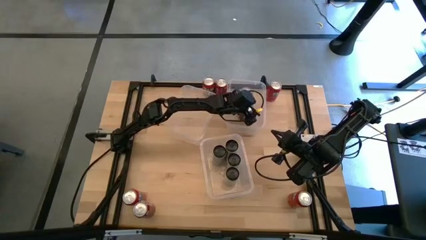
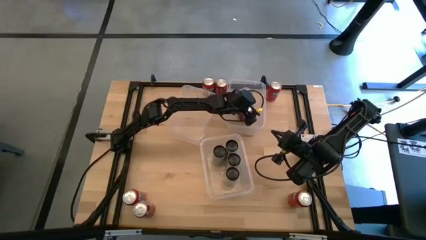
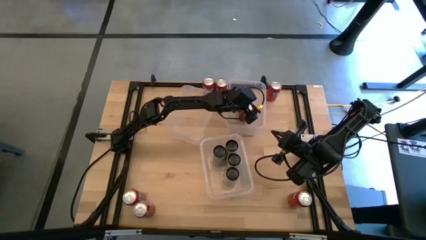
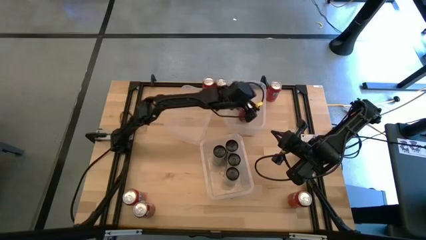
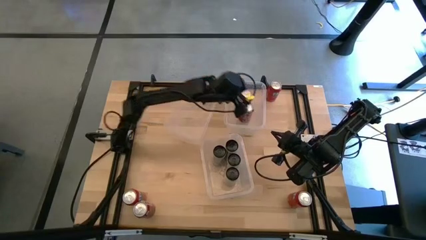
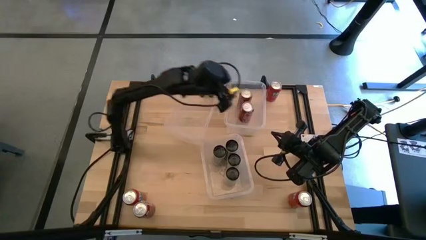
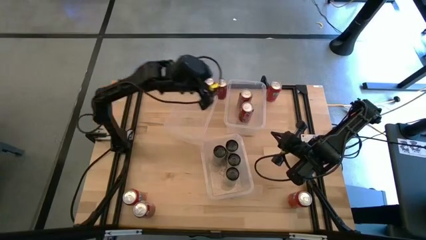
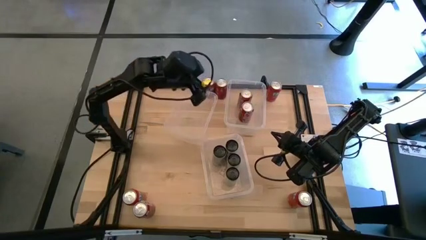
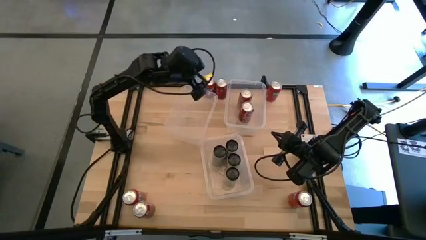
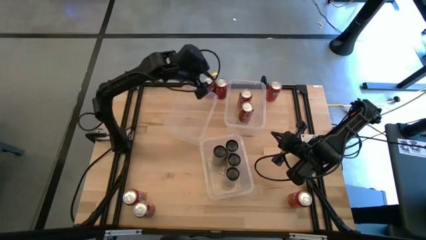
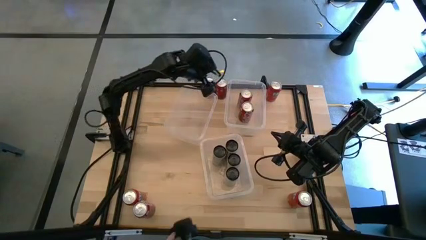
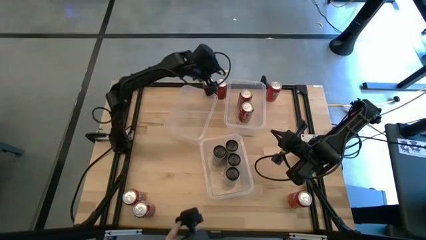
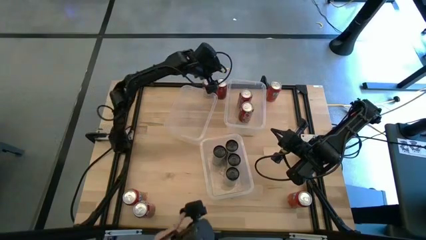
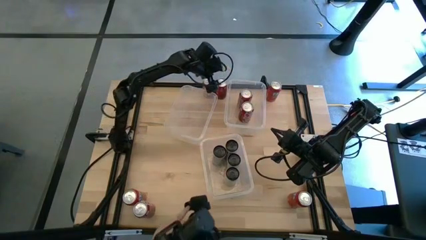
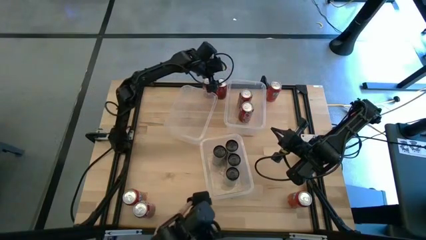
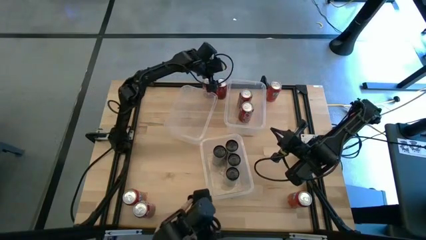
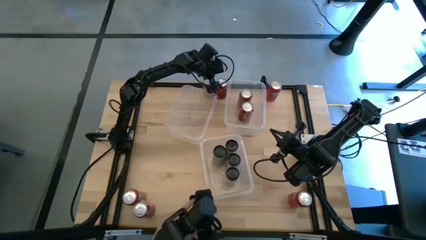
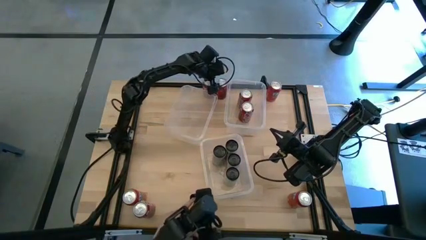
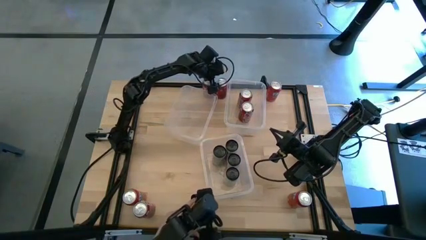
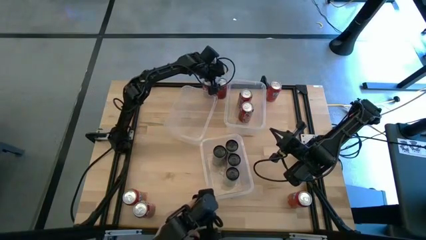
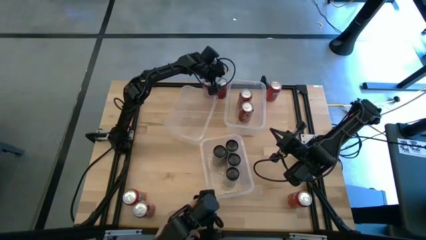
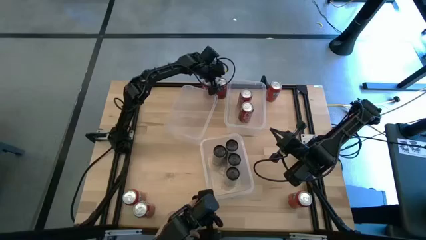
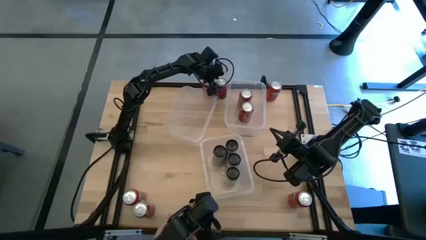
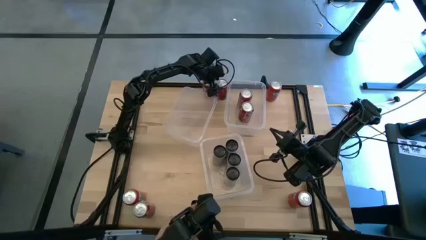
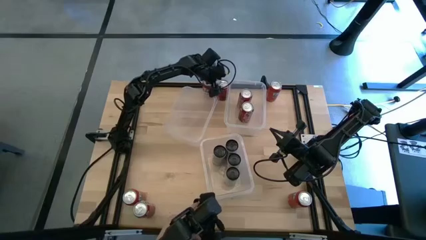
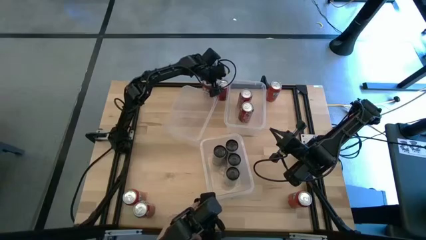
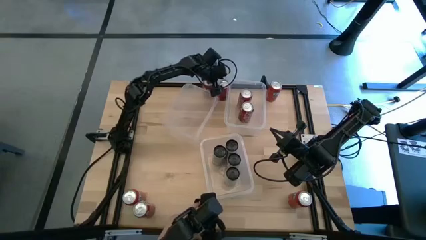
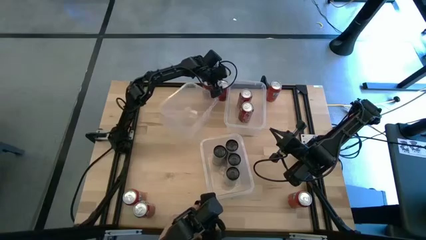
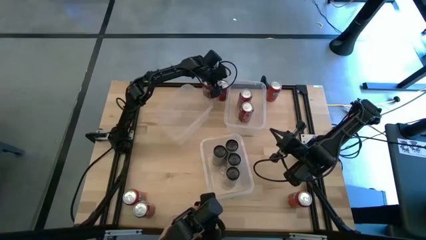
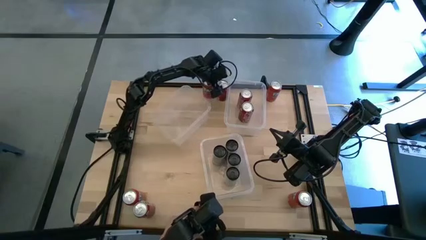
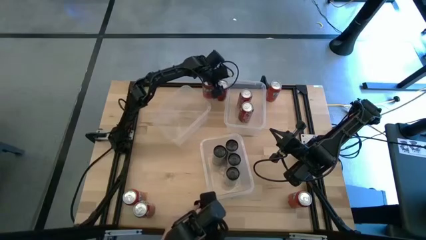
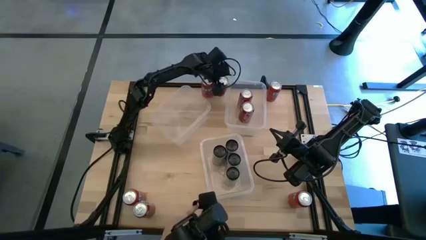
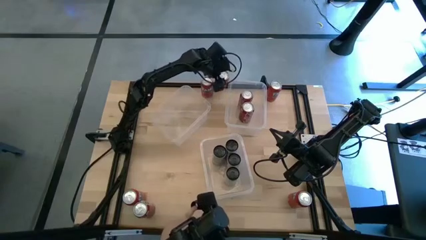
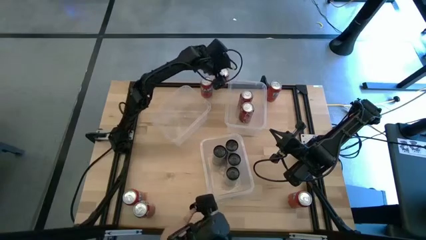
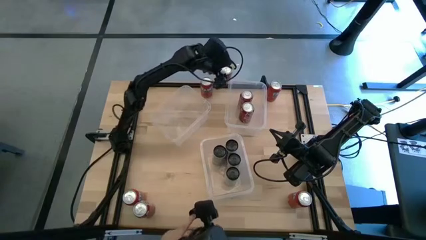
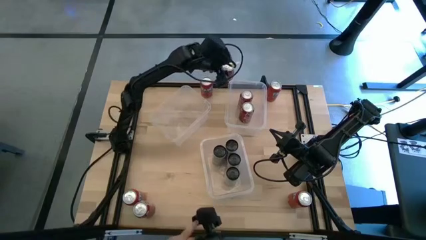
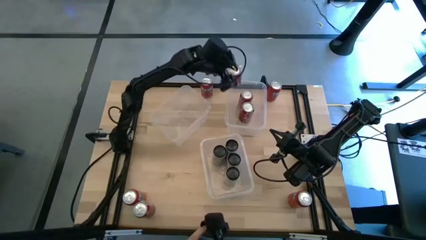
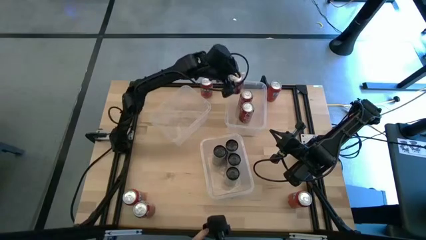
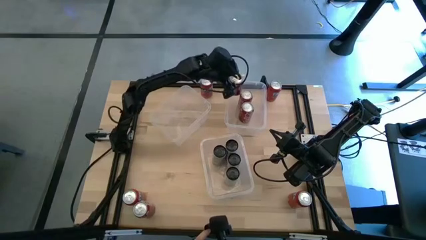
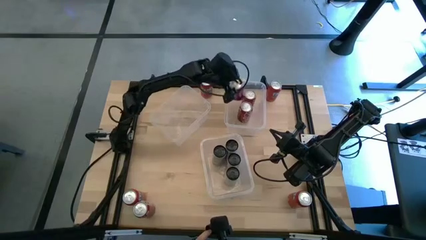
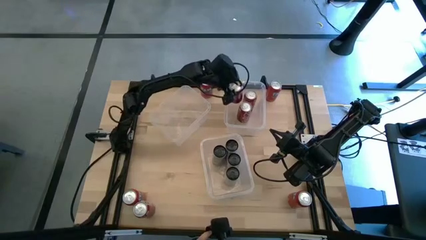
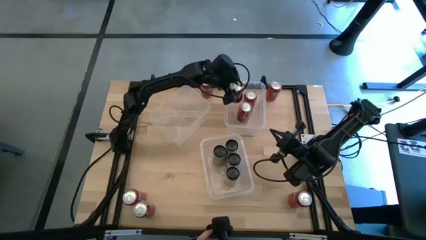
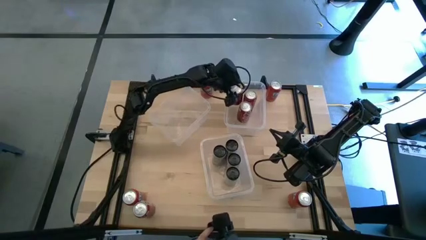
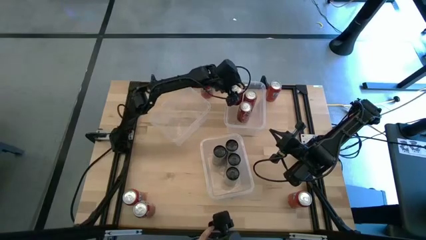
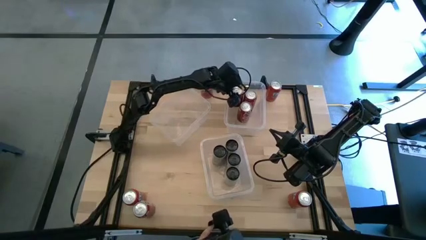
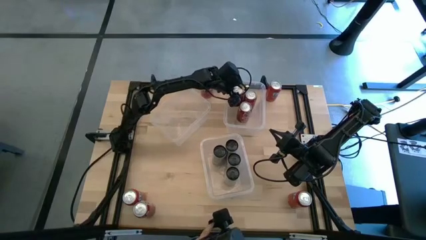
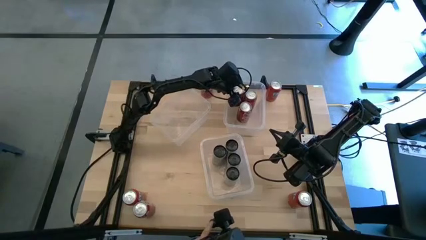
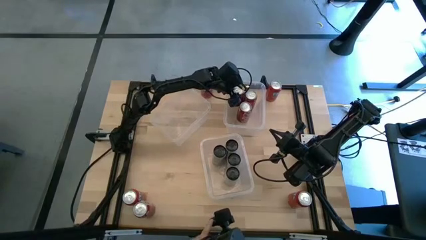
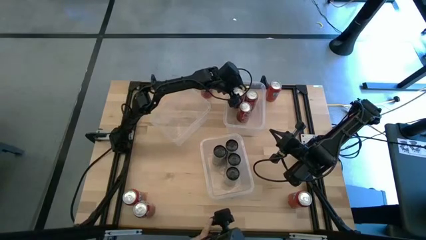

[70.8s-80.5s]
Task: Sort soda cans
Put the red/white soda can into the right transparent bin

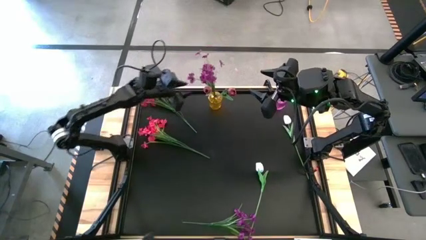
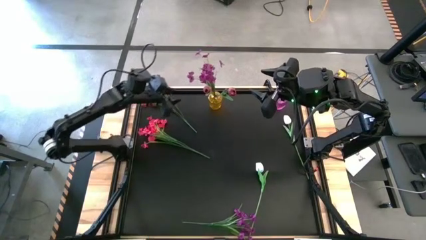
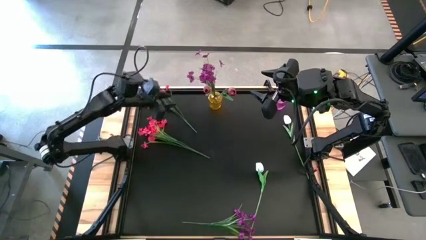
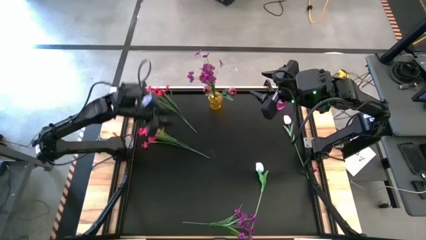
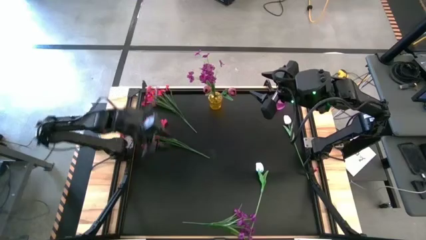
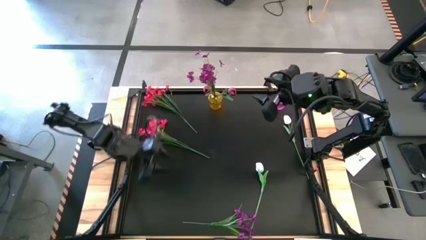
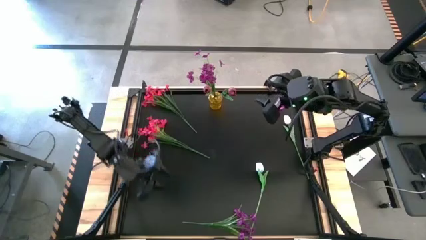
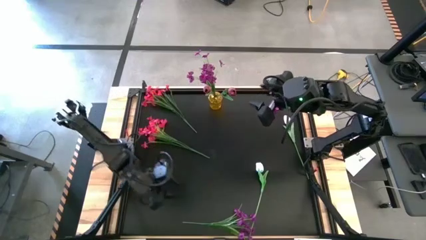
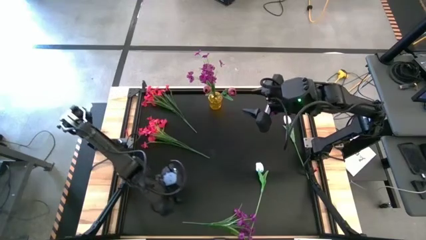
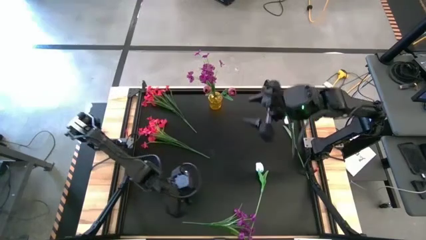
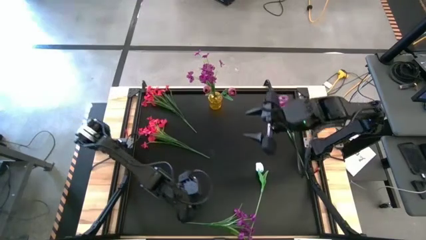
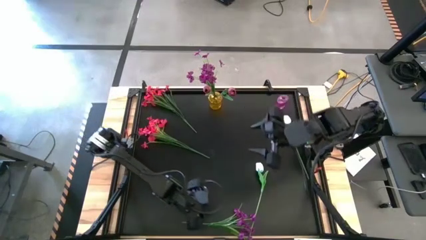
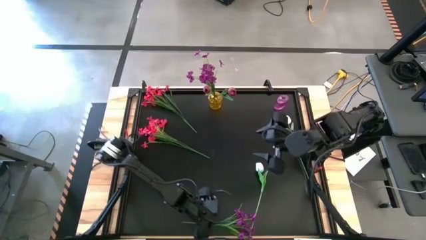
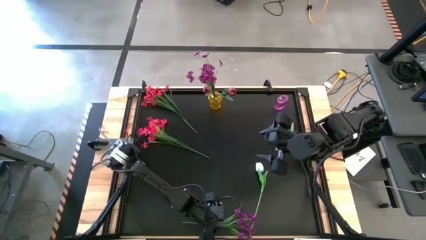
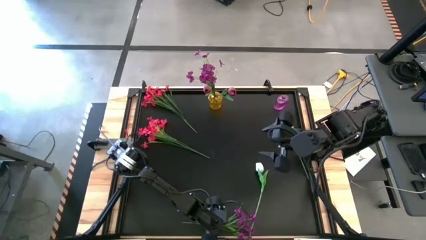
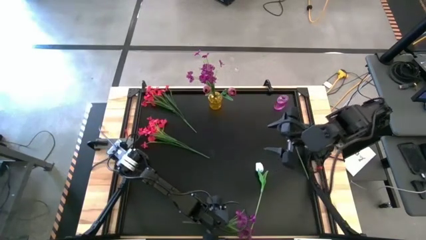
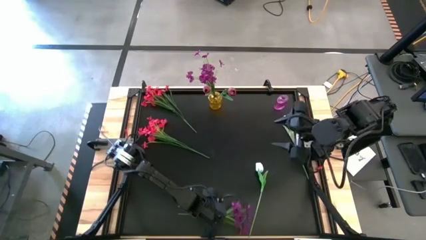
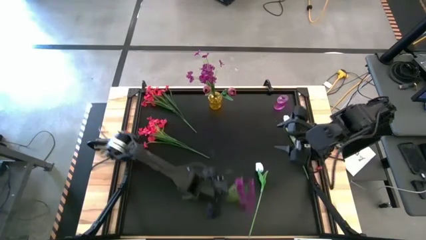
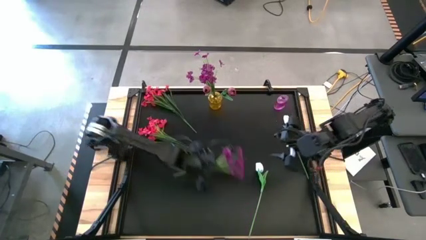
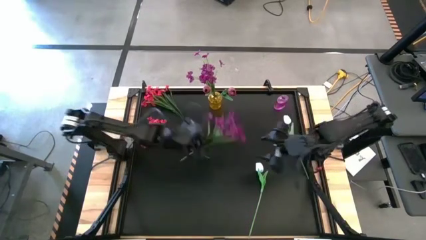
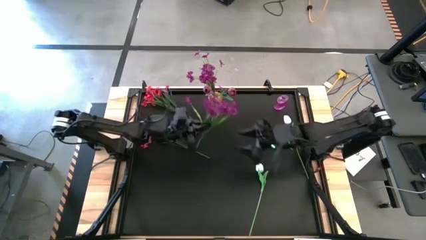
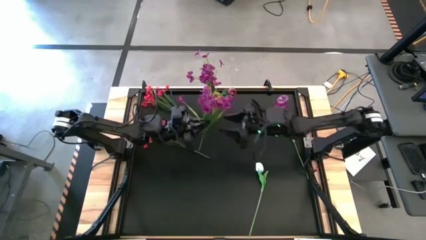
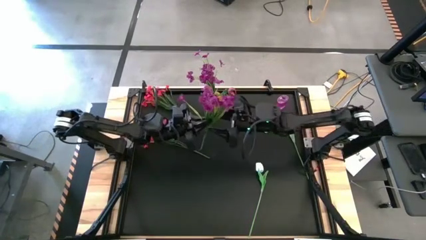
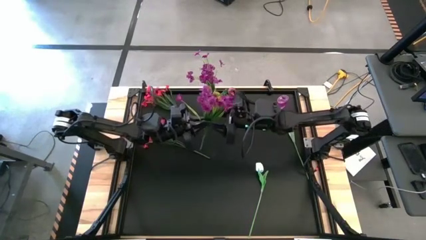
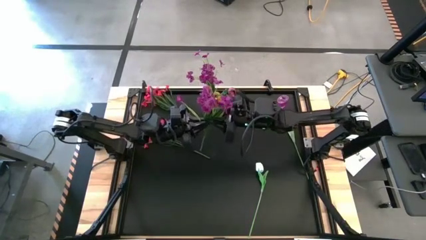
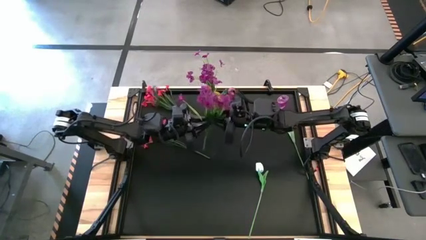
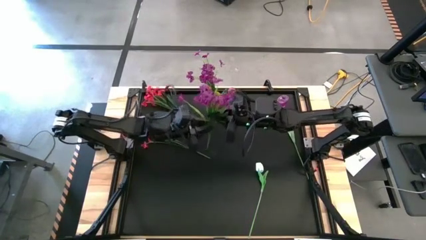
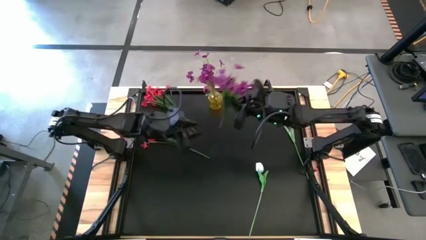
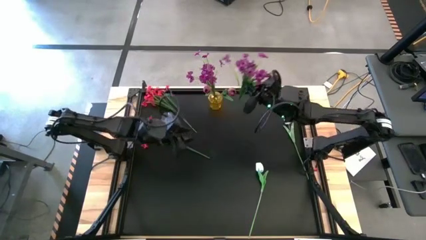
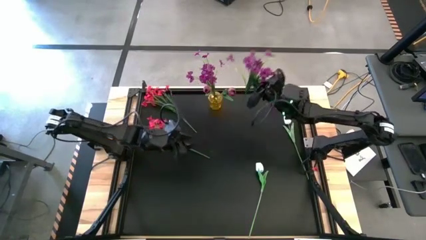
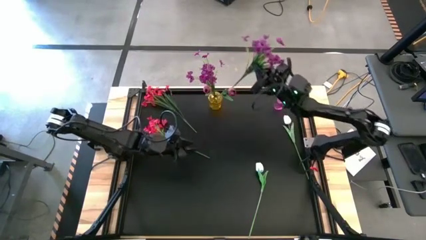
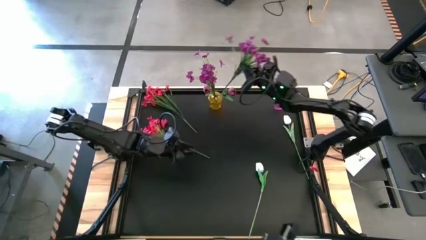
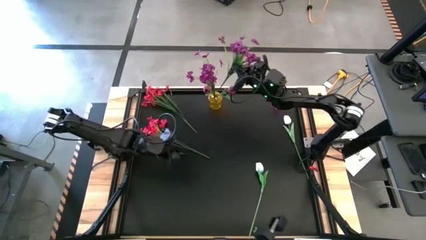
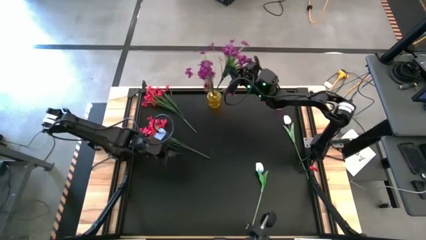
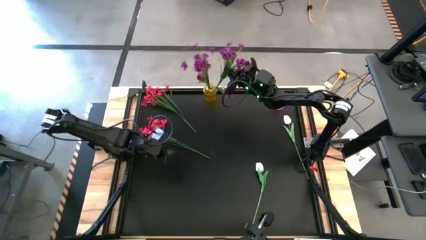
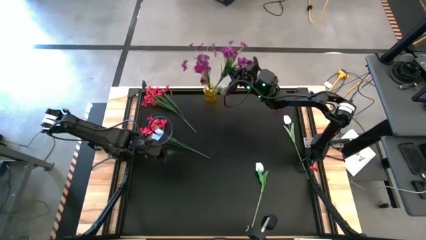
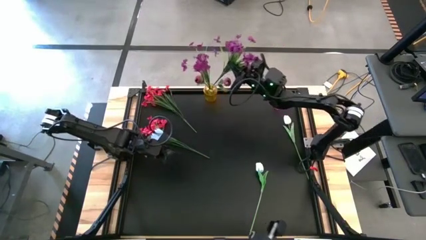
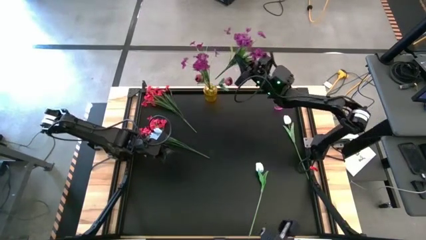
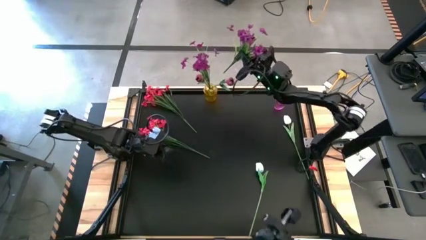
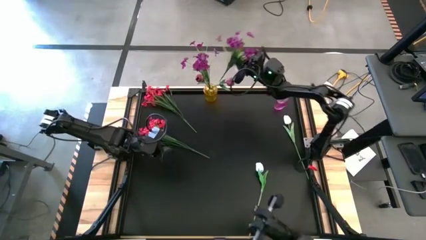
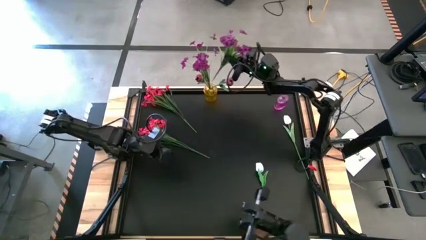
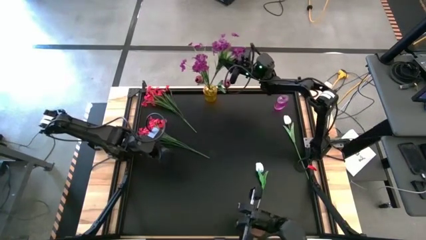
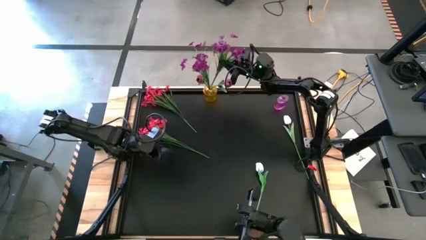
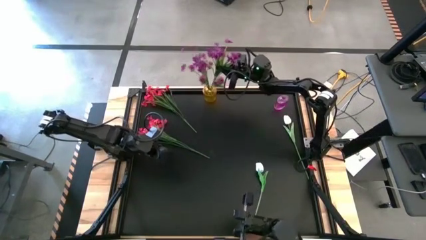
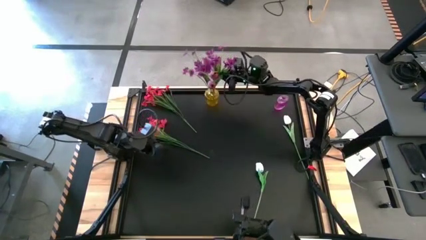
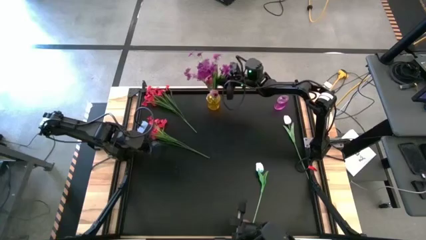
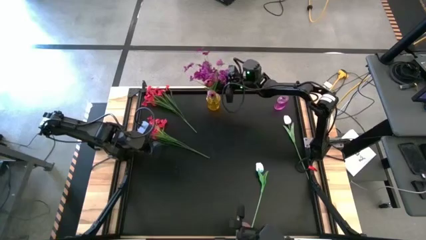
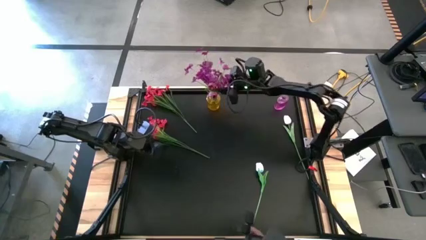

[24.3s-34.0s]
Task: Sort flowers into vase by color
Put the violet flowers into the yellow flower vase
